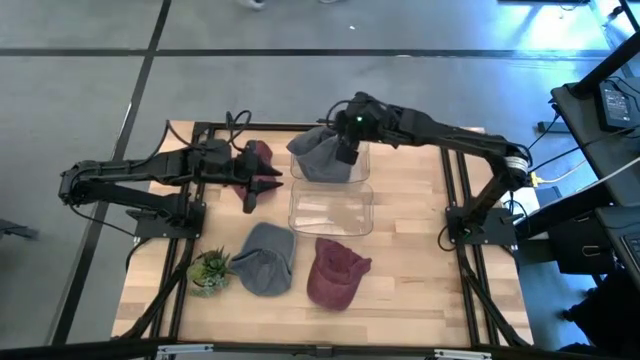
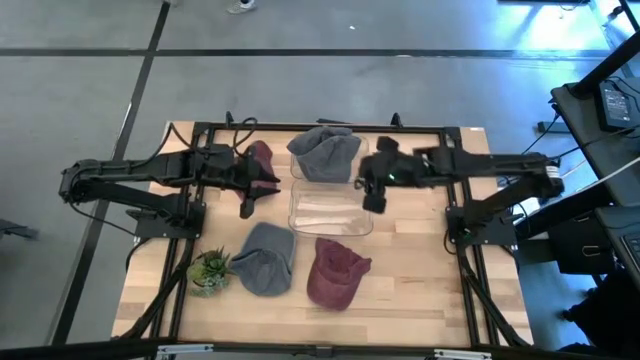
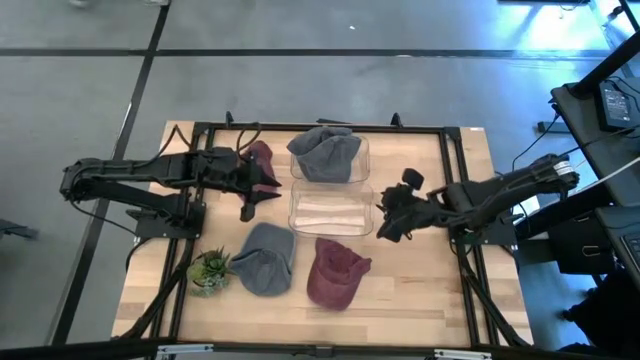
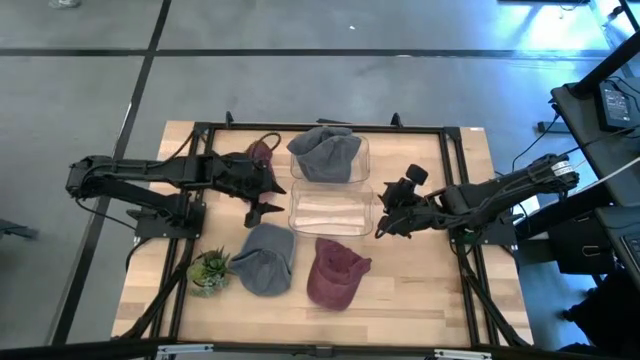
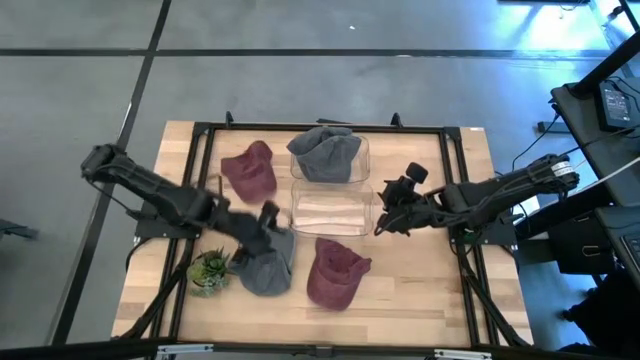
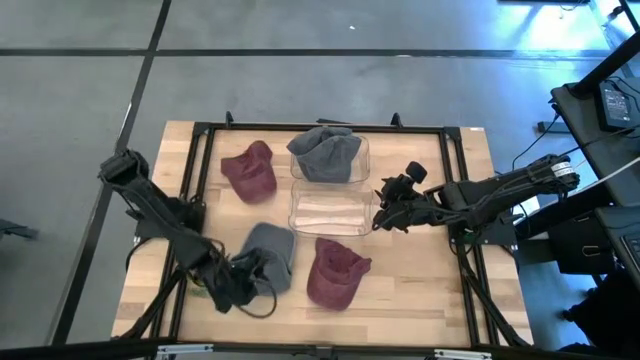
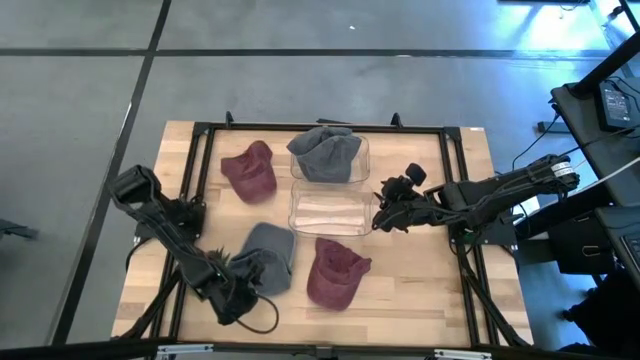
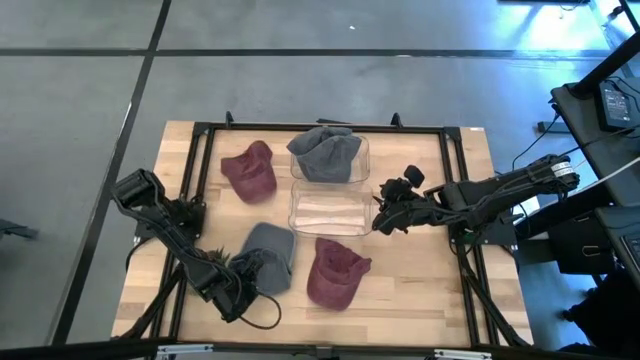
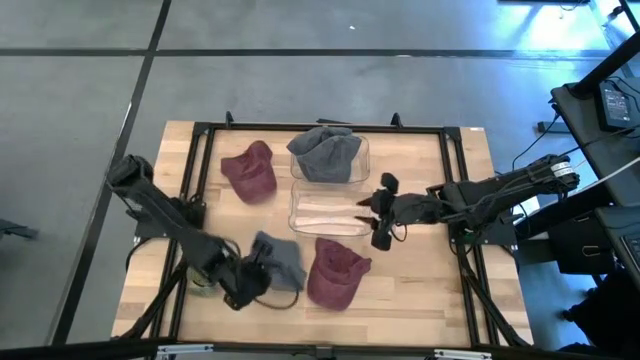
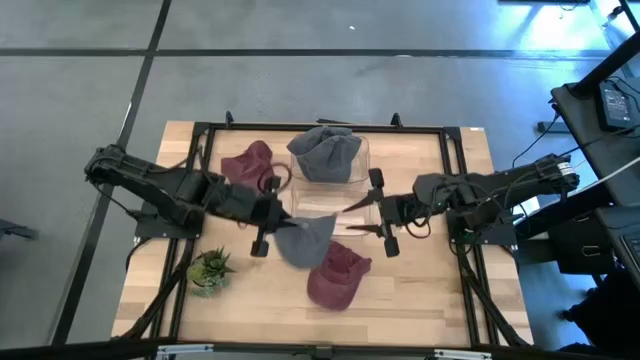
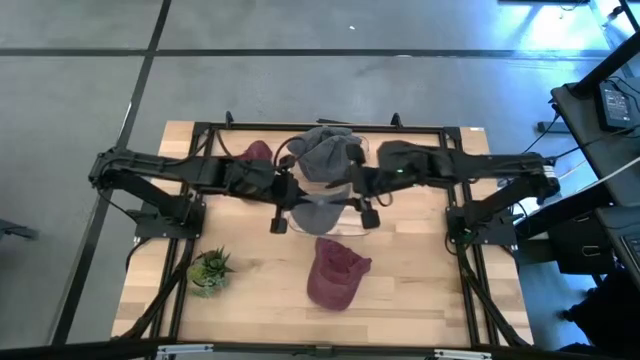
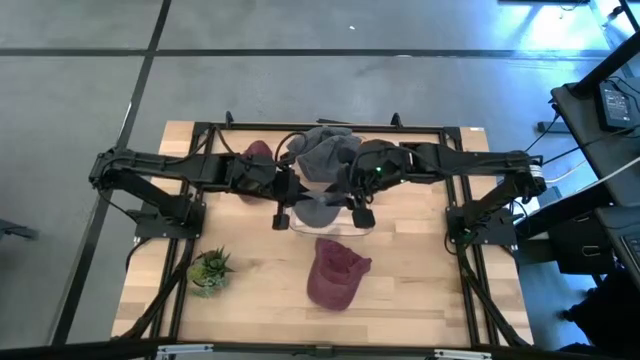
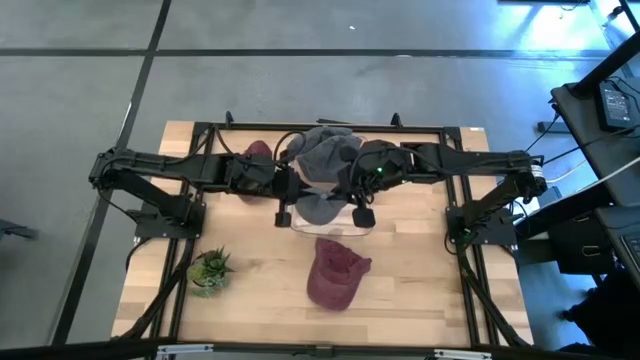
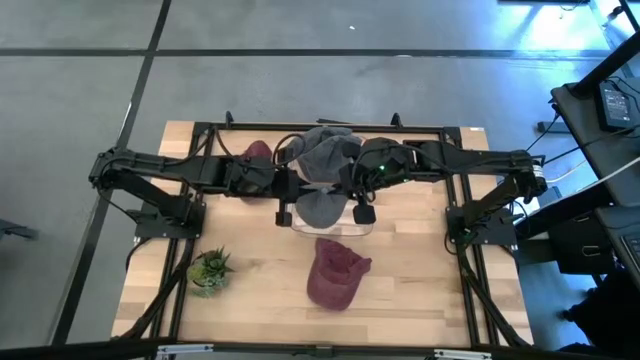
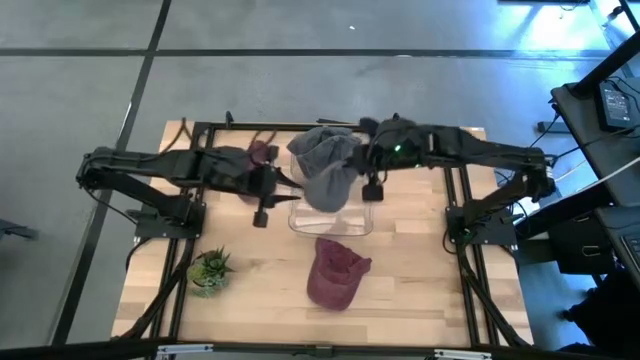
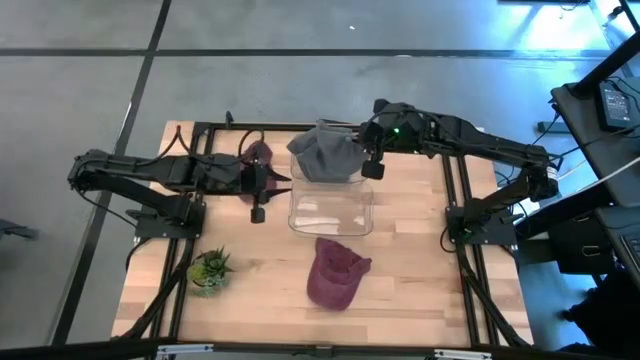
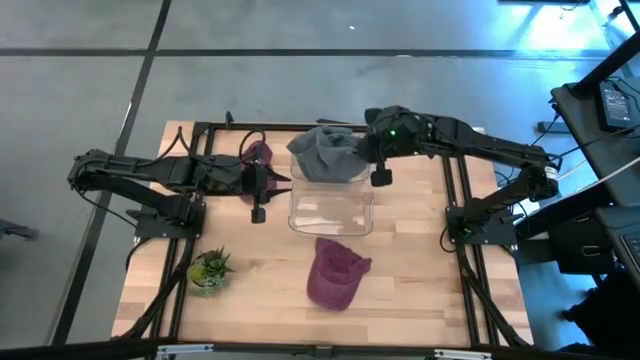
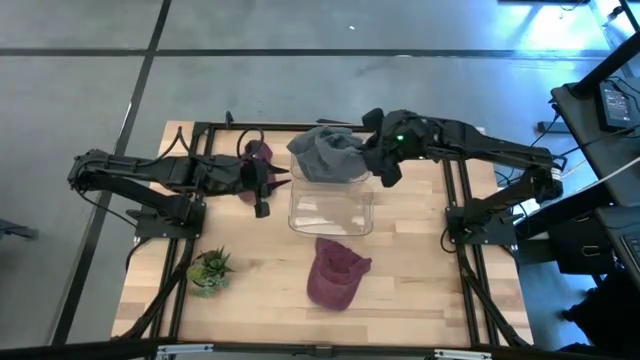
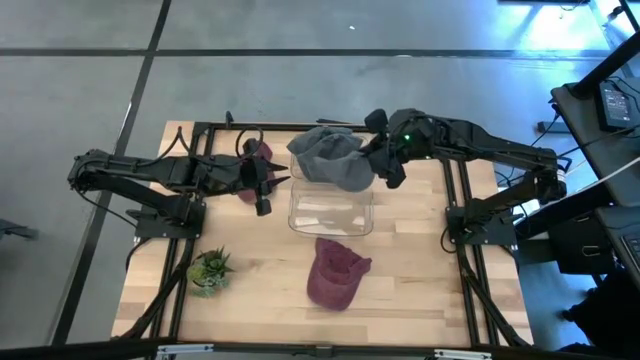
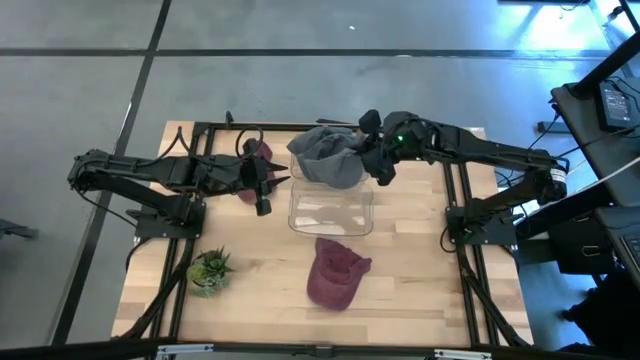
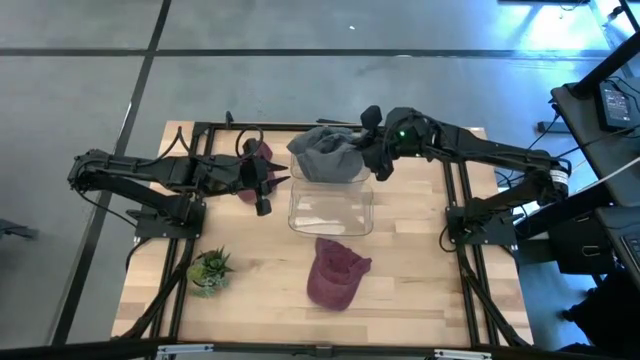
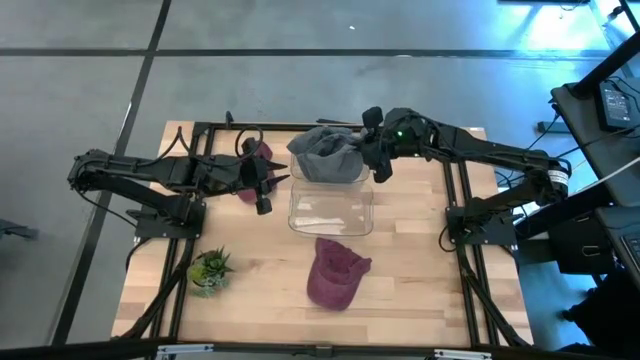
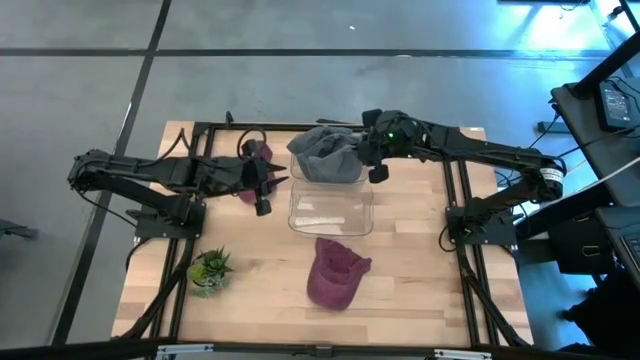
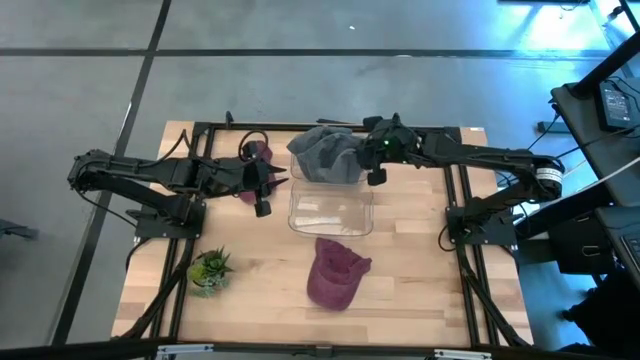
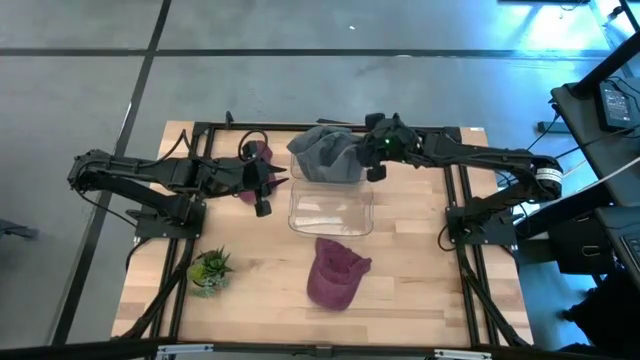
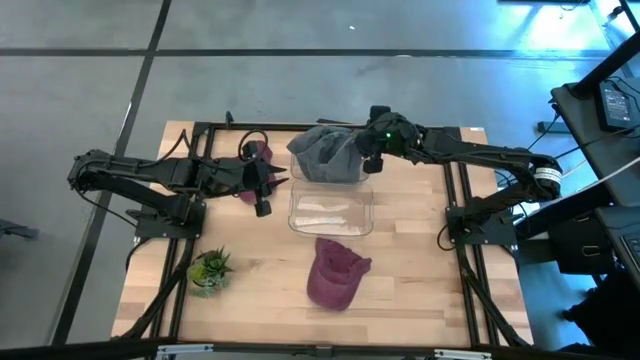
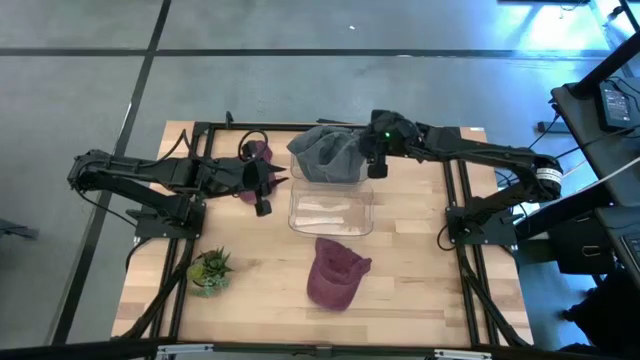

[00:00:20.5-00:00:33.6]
Task: Pick & Place hat
Put the gray cap into the top transparent bin

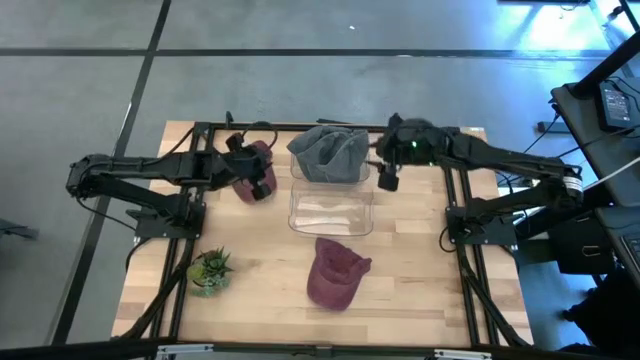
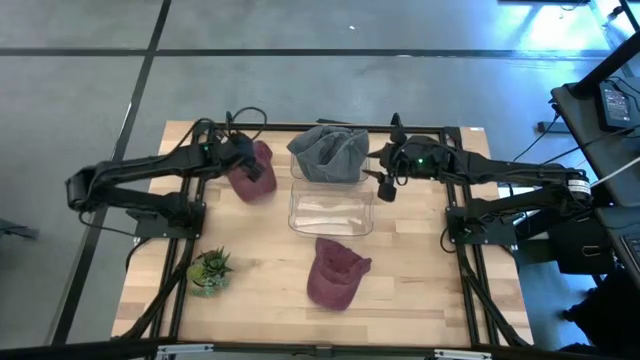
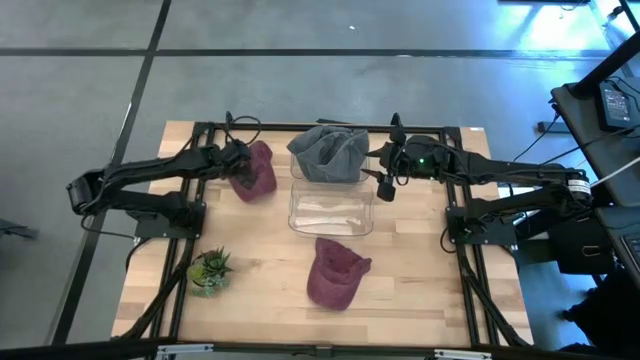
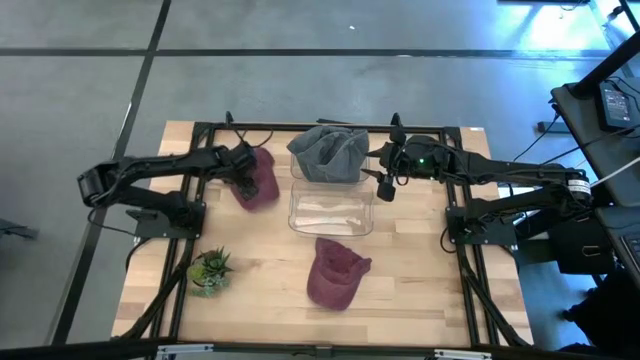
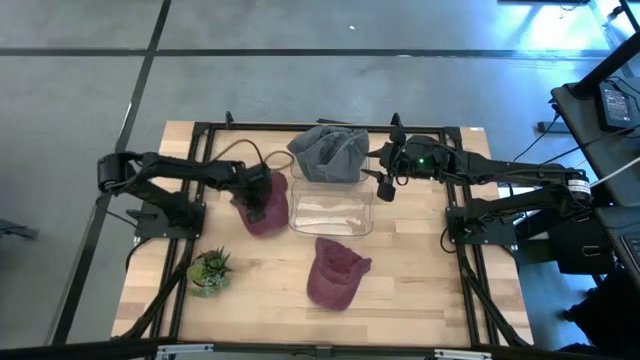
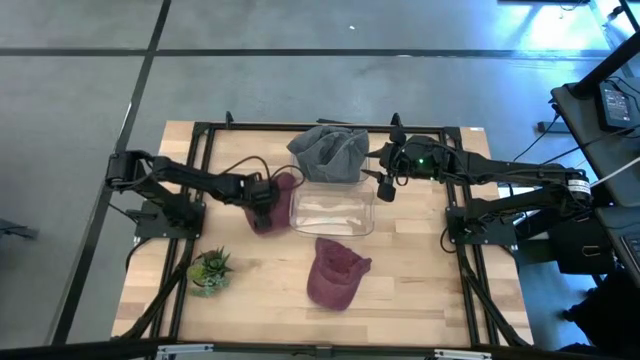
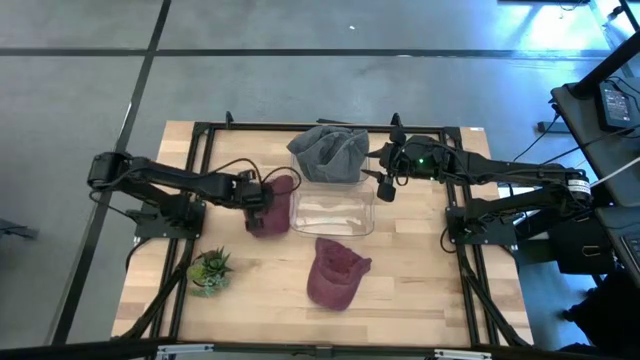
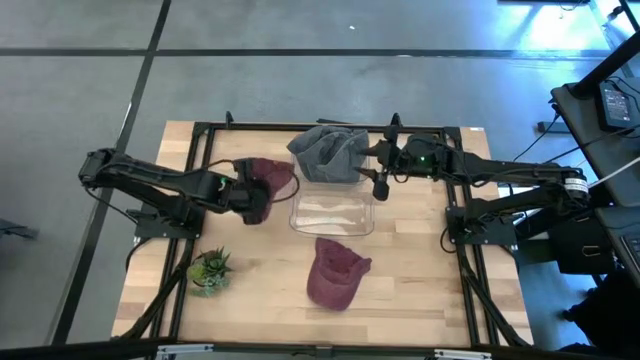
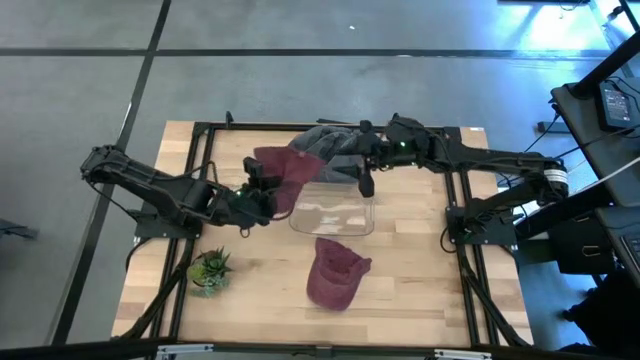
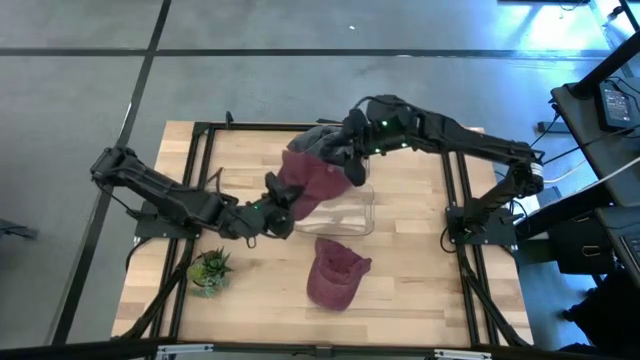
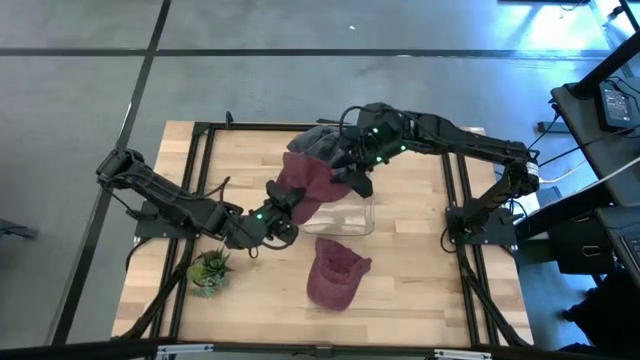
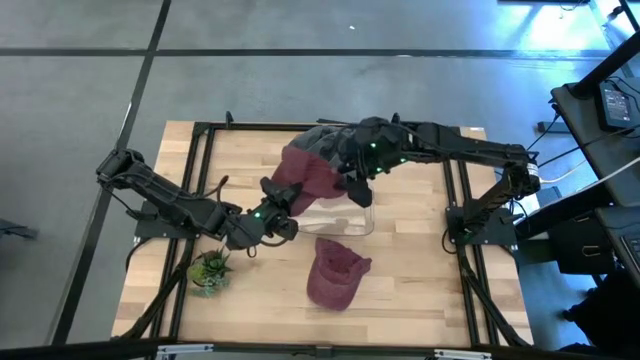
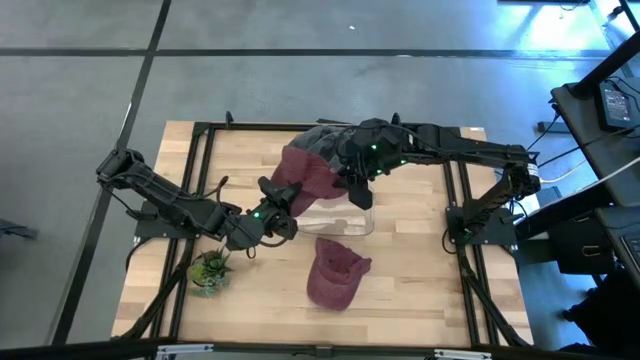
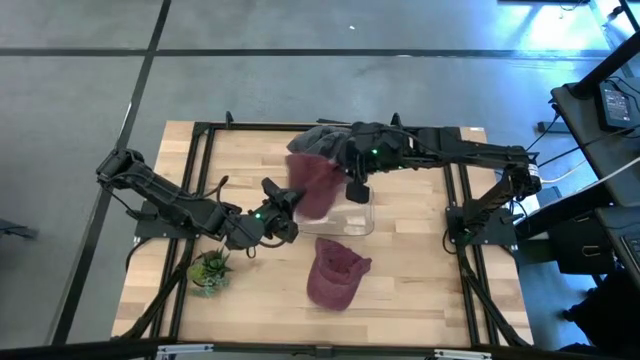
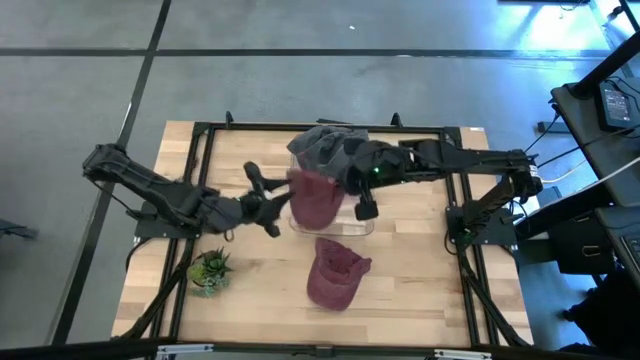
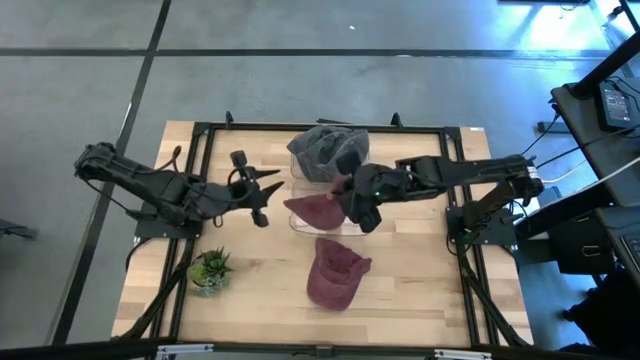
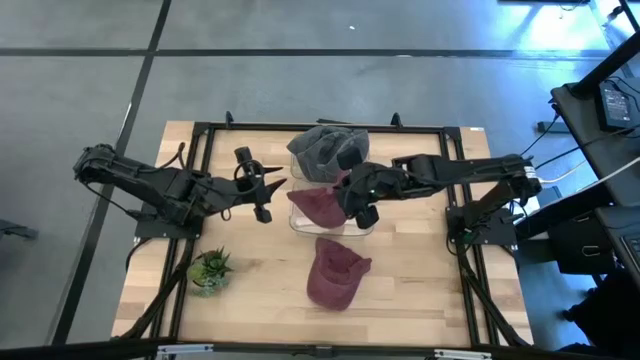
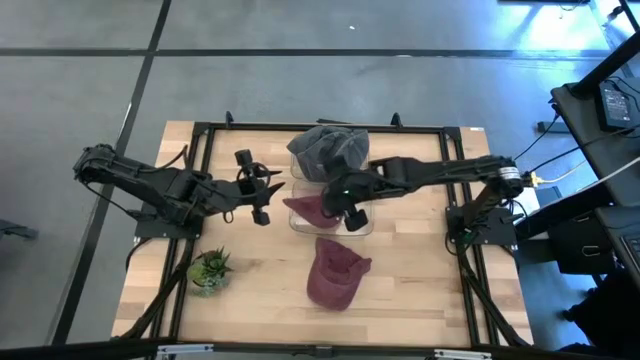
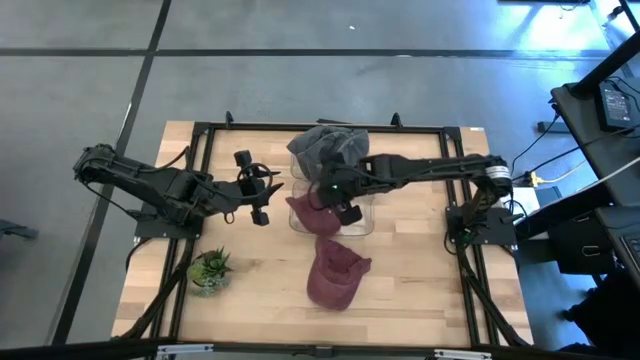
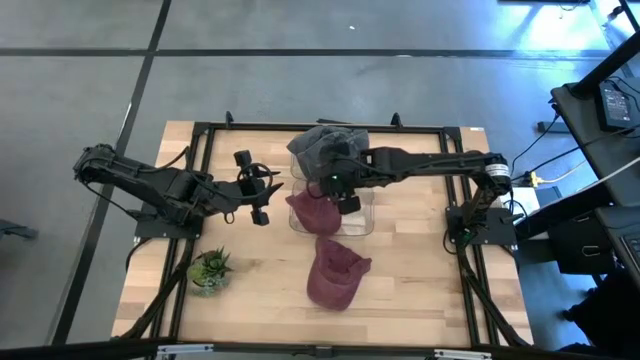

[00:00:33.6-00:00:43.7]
Put the top red cap into the bottom transparent bin
